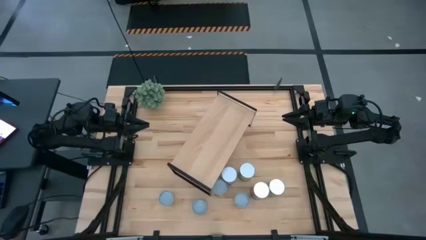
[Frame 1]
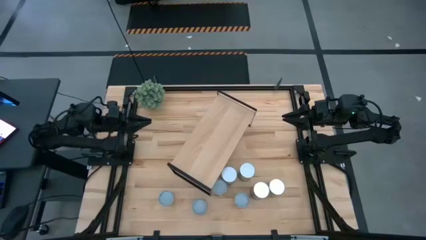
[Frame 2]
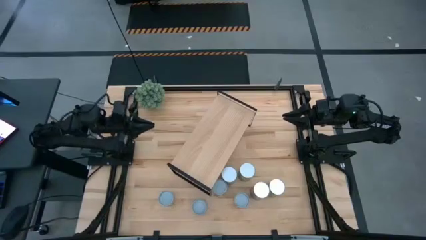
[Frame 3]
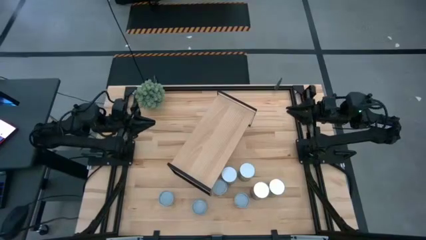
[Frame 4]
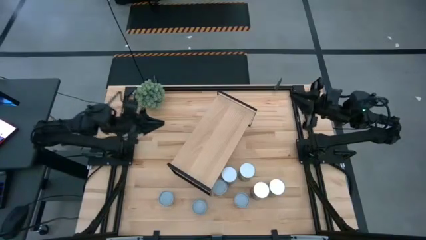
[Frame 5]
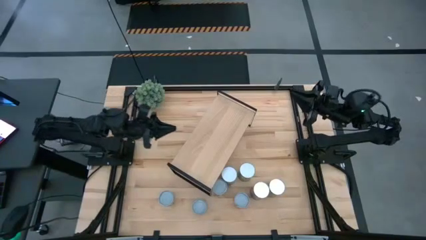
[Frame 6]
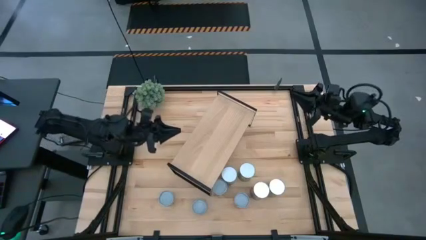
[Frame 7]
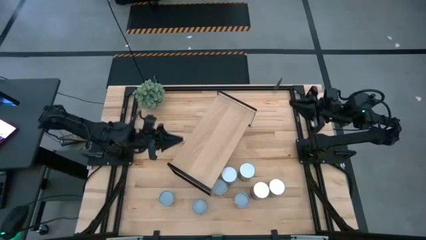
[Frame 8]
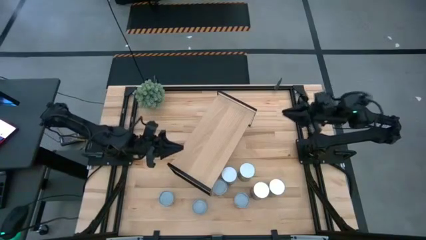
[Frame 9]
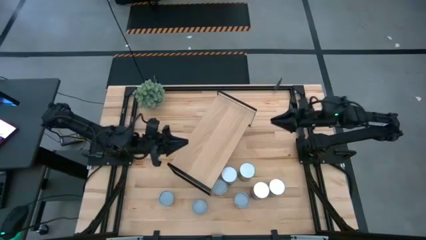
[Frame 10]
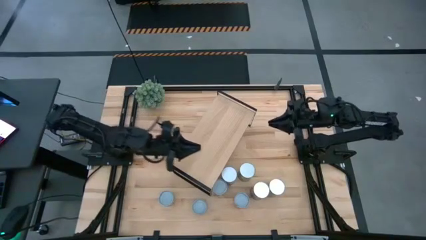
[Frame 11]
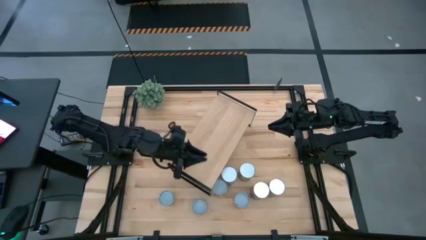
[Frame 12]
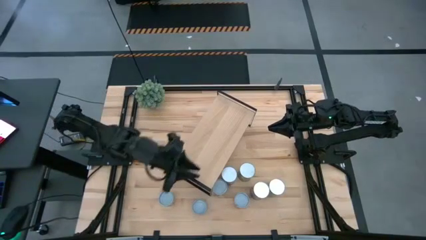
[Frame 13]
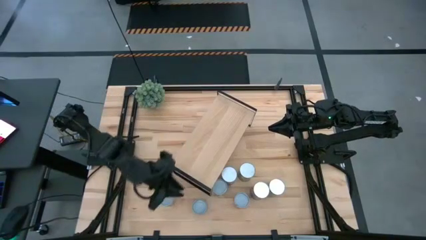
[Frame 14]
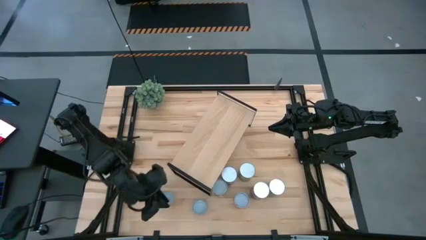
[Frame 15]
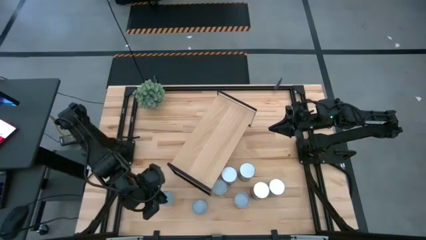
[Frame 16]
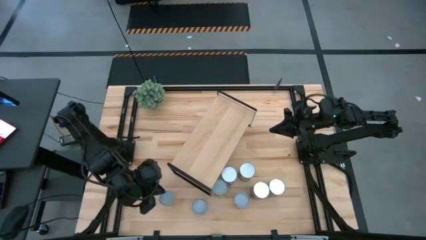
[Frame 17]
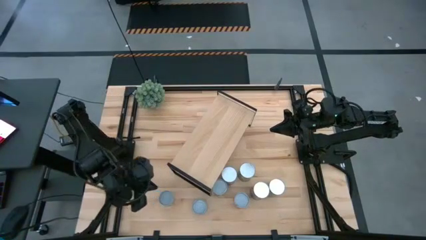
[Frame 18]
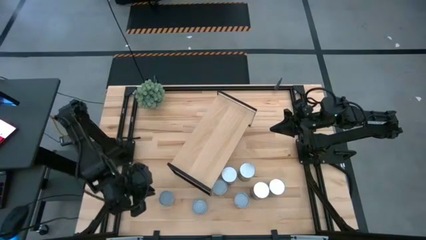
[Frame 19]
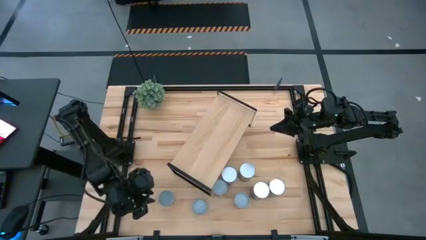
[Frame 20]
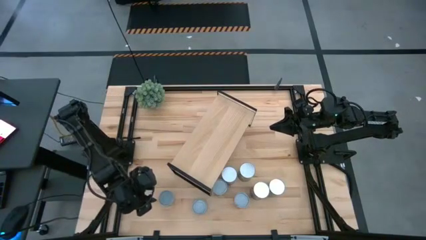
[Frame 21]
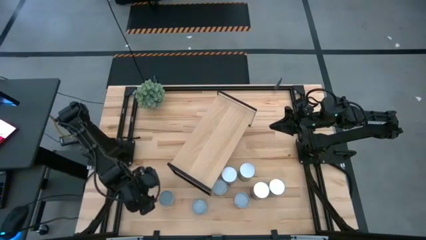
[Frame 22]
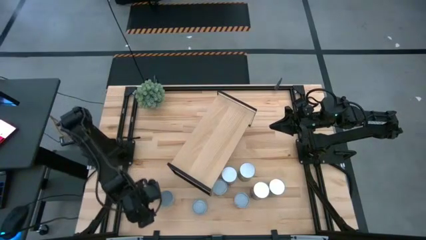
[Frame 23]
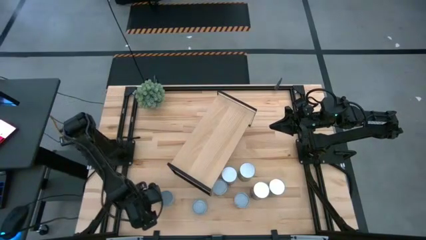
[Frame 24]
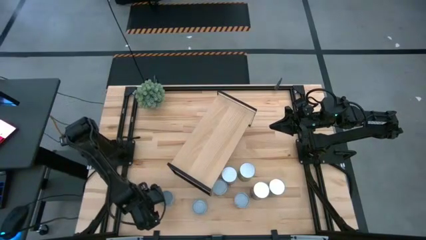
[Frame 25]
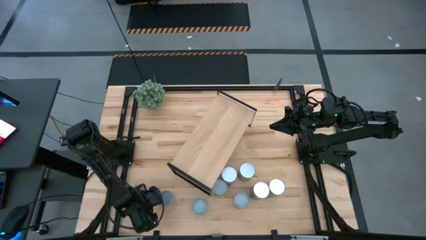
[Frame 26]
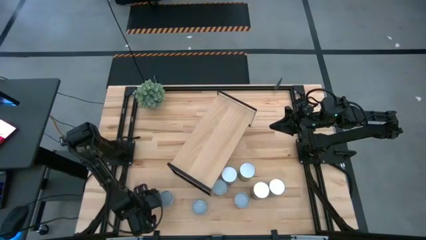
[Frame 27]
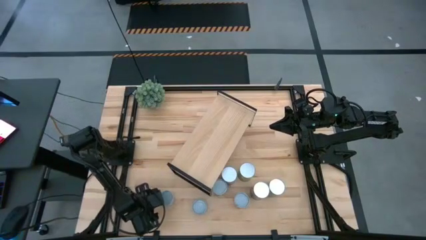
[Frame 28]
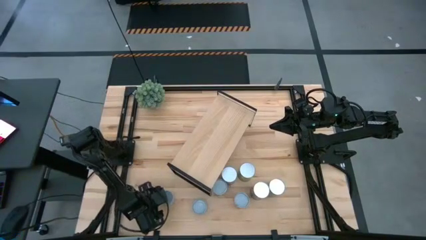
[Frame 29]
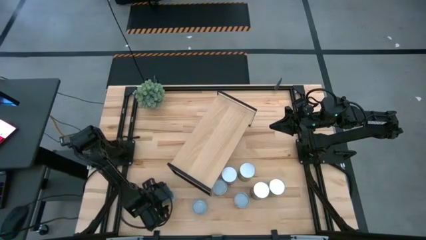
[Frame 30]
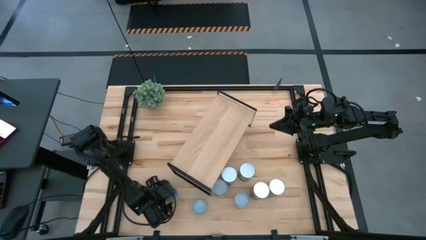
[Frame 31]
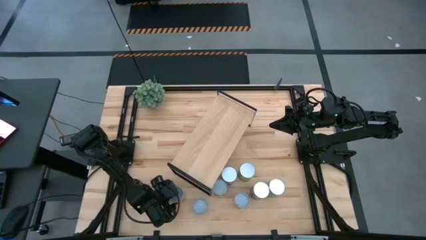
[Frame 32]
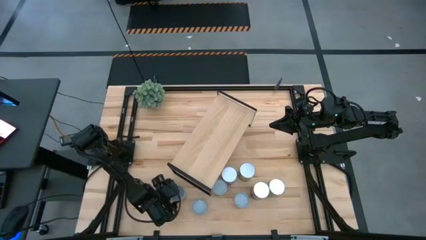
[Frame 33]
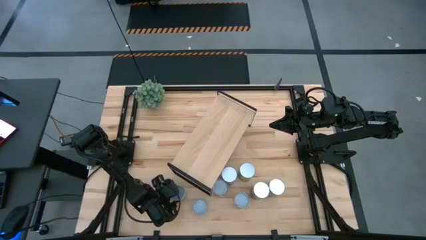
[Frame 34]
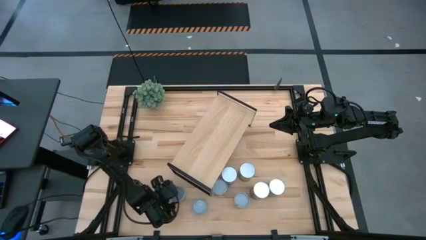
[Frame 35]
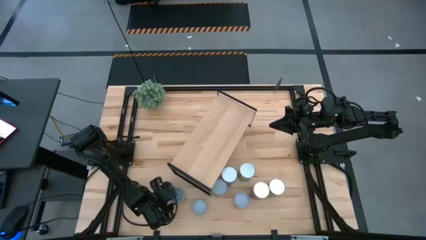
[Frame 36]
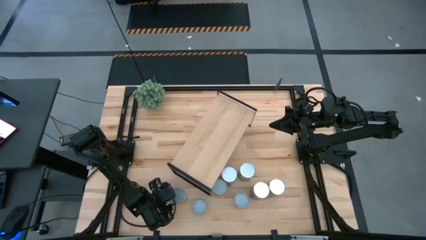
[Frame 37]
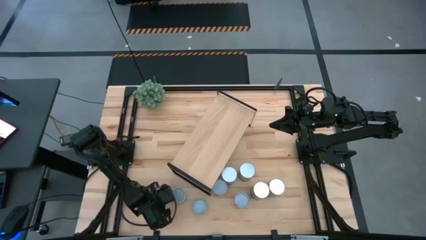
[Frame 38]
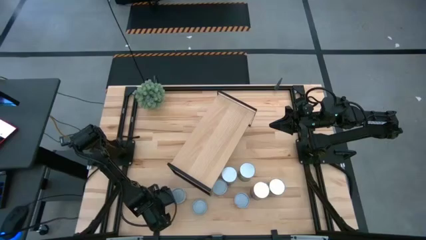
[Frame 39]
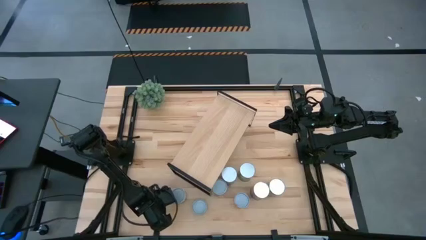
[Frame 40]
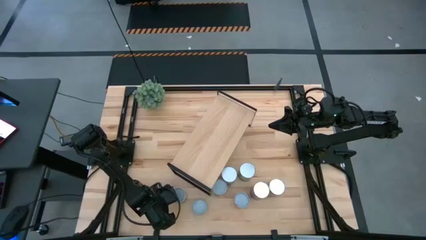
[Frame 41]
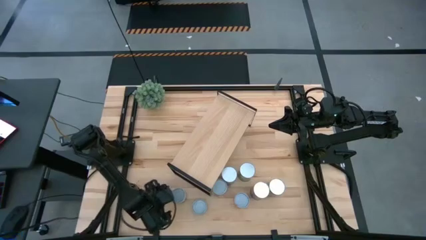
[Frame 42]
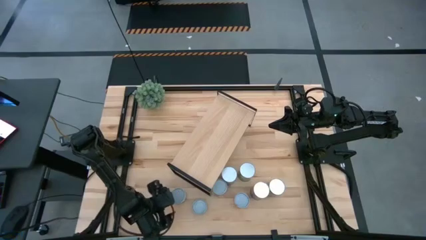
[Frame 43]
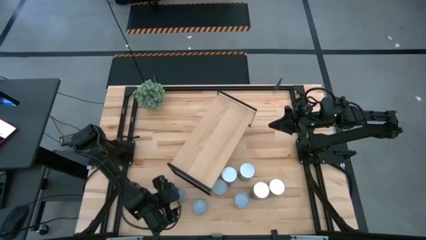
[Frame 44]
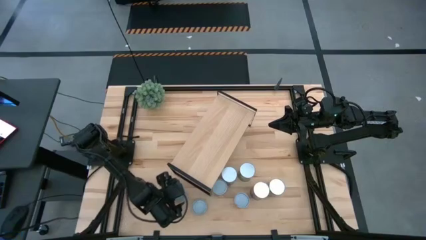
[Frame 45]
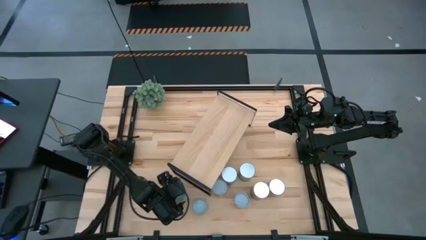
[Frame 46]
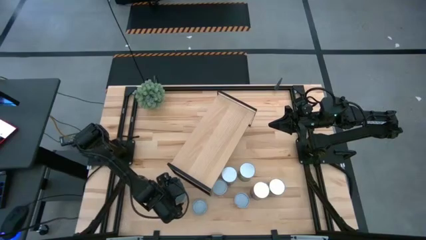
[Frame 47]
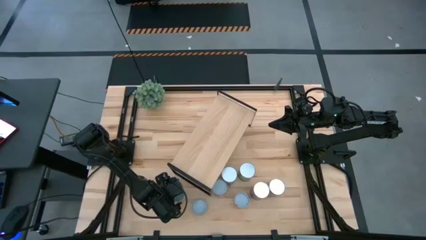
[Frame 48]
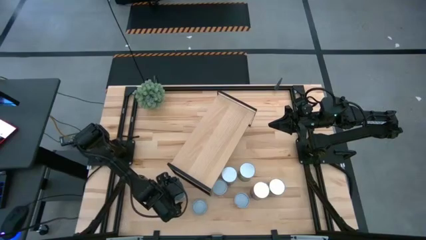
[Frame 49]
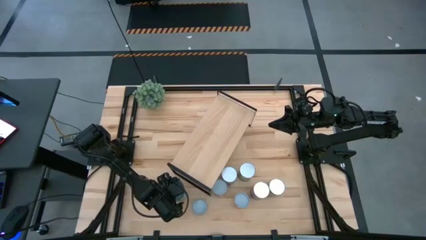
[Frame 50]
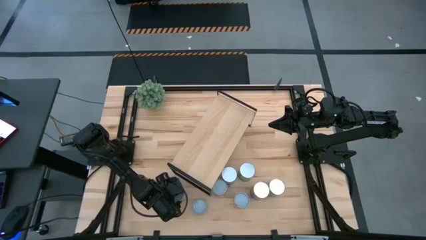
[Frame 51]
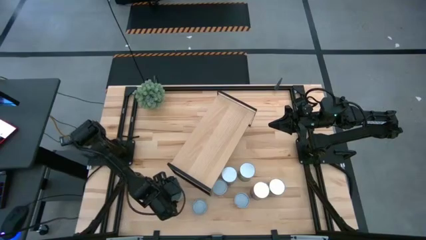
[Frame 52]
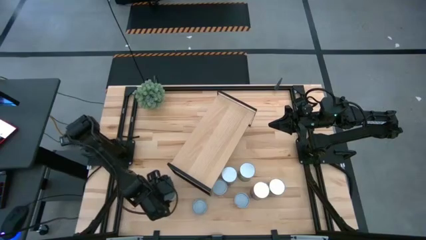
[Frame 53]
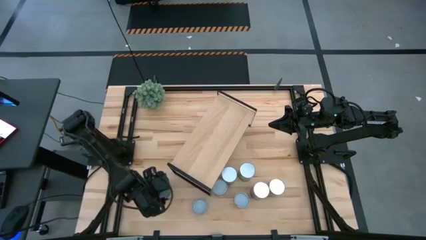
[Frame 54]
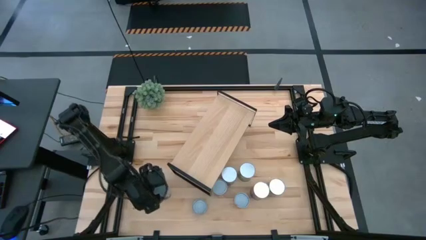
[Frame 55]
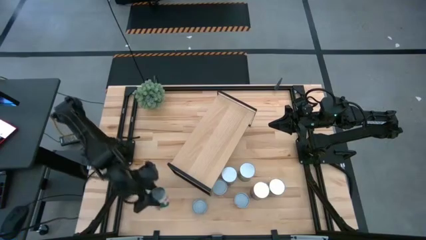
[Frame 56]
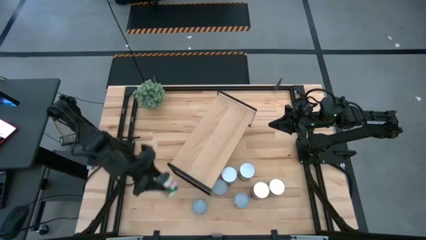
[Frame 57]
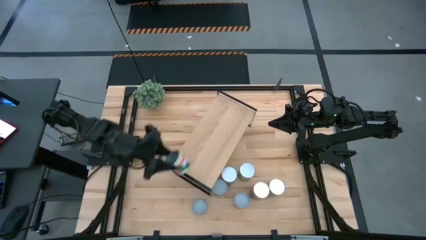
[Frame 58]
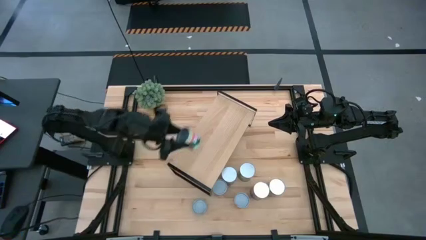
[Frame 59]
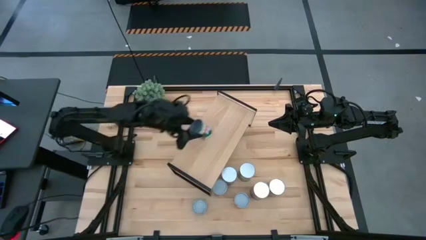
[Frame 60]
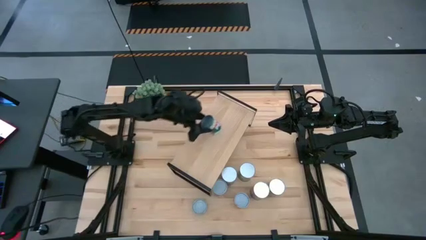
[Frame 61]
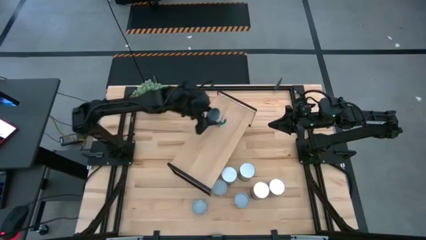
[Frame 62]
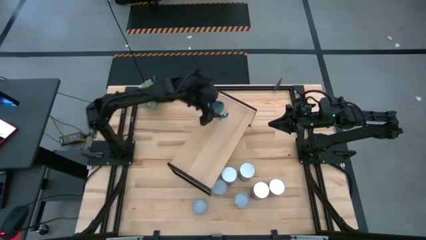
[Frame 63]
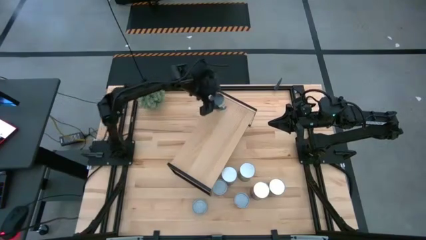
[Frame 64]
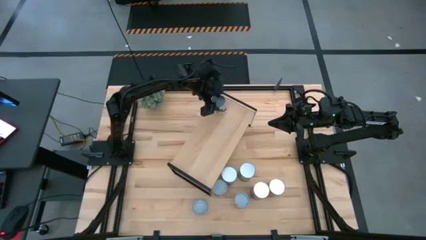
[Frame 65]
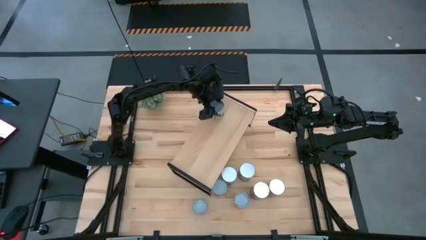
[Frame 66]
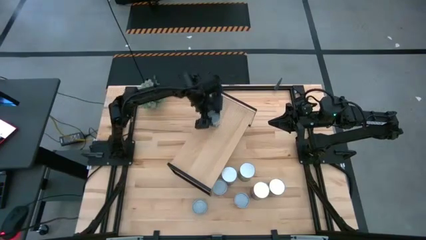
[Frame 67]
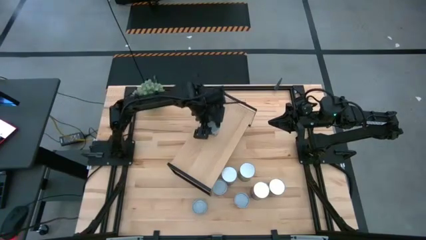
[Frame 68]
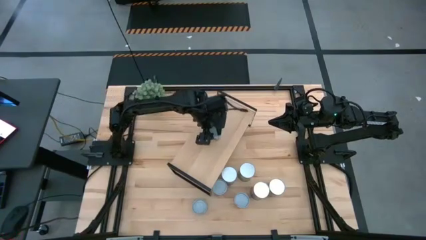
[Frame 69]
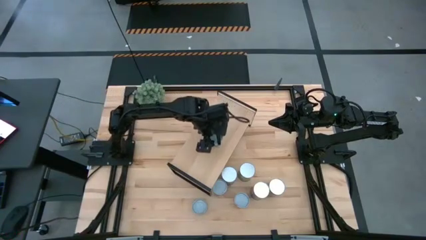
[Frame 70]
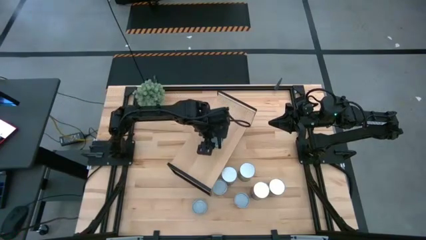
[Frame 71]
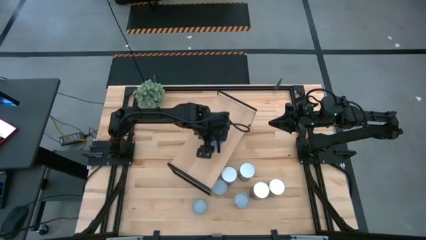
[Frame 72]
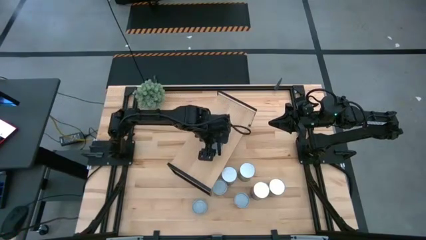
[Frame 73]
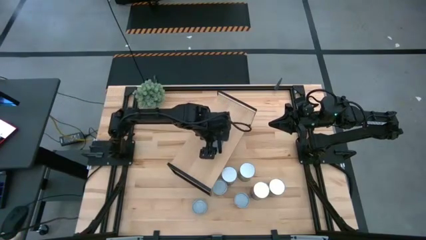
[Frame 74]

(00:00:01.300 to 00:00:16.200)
Task: Pick and place cans onto a shelf
Put the canned green peas on the shelf
